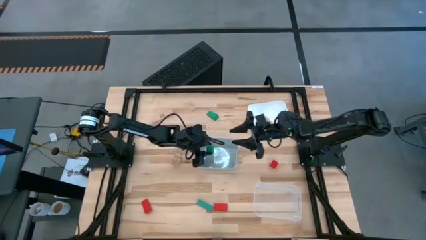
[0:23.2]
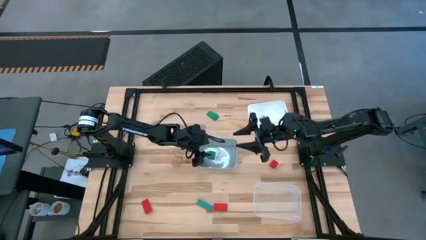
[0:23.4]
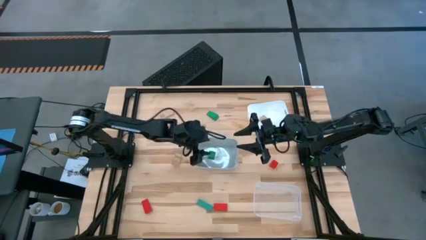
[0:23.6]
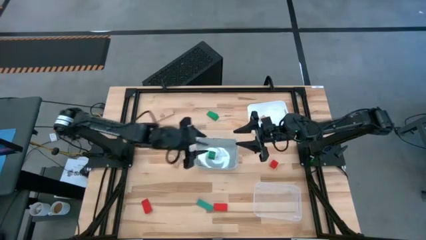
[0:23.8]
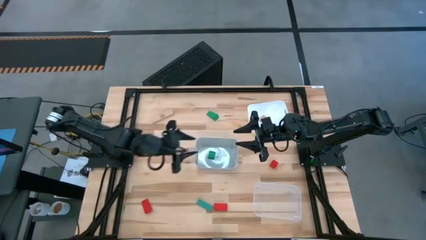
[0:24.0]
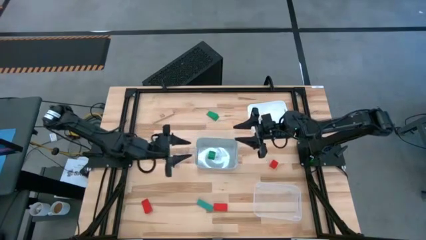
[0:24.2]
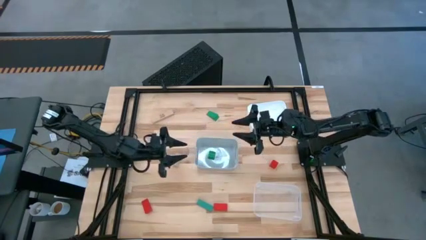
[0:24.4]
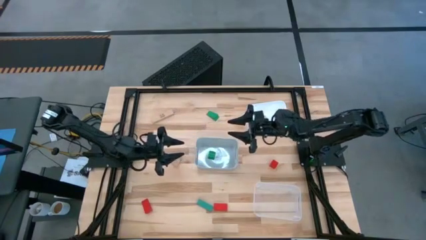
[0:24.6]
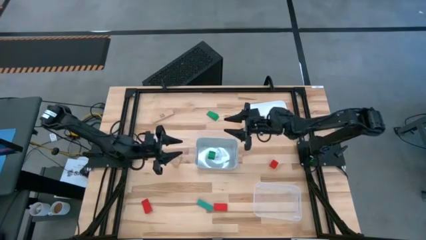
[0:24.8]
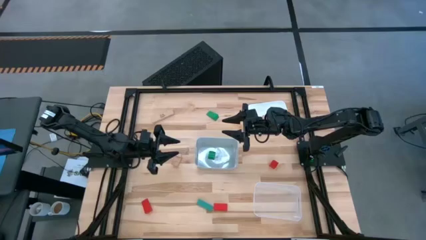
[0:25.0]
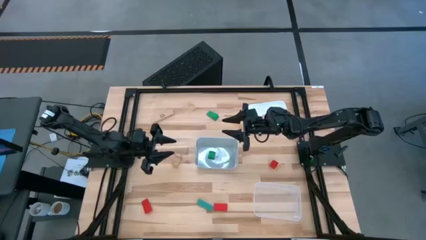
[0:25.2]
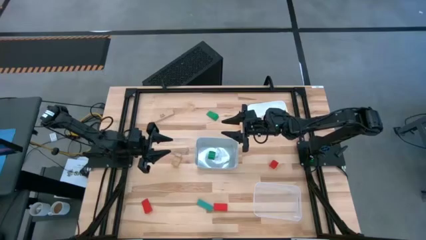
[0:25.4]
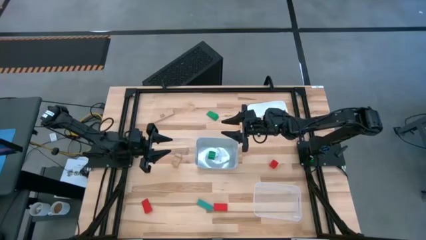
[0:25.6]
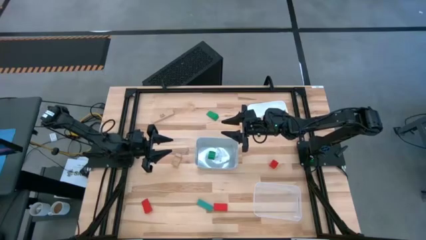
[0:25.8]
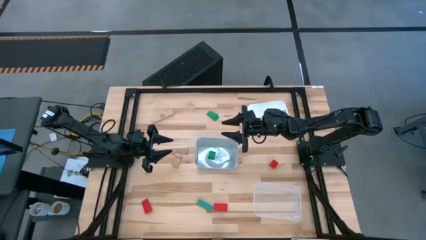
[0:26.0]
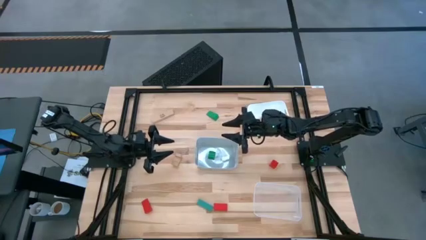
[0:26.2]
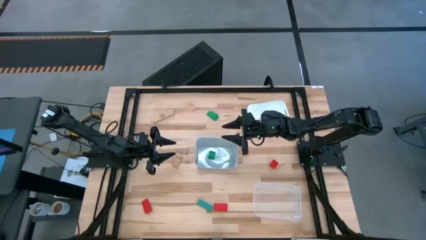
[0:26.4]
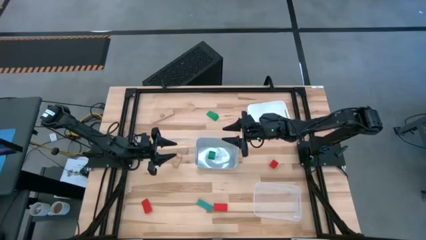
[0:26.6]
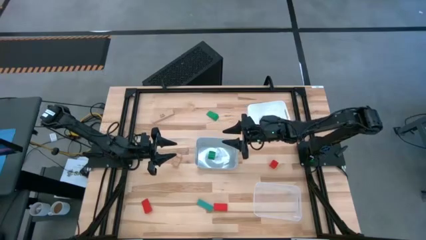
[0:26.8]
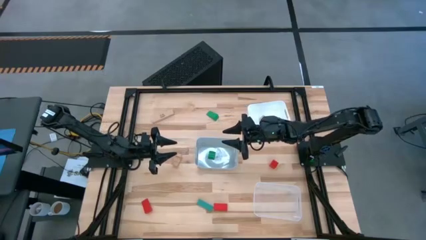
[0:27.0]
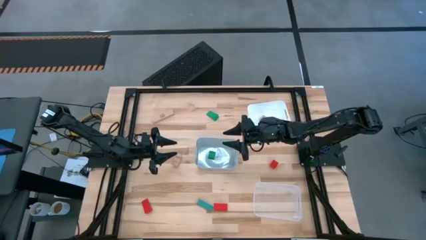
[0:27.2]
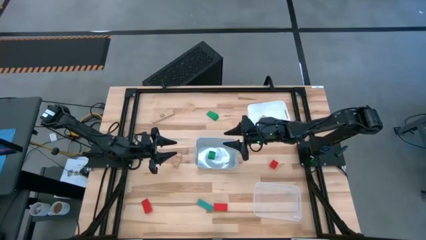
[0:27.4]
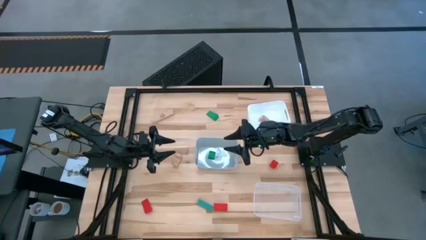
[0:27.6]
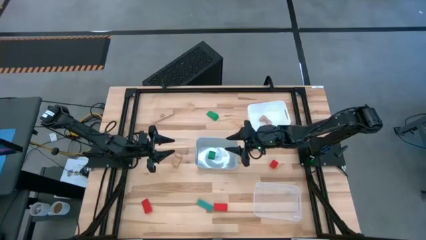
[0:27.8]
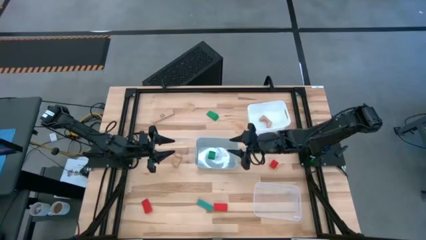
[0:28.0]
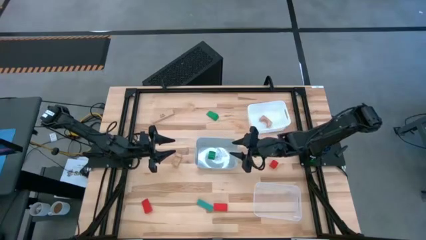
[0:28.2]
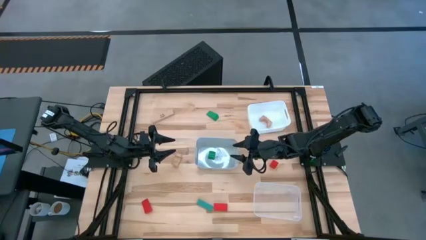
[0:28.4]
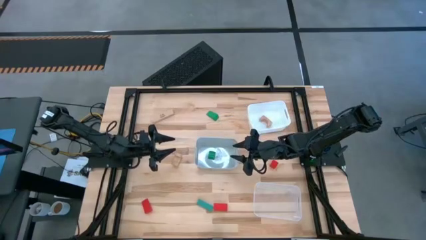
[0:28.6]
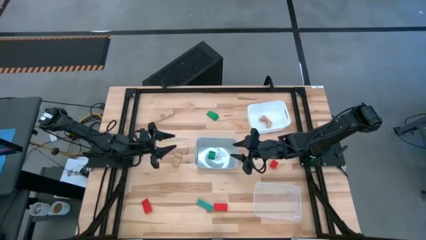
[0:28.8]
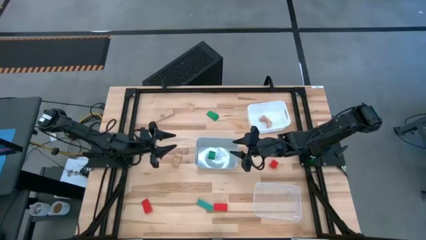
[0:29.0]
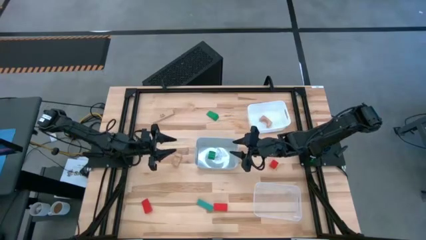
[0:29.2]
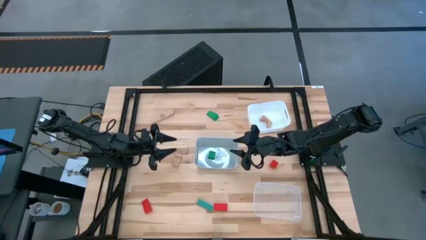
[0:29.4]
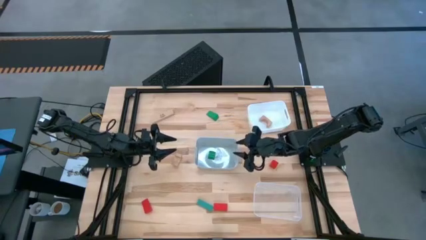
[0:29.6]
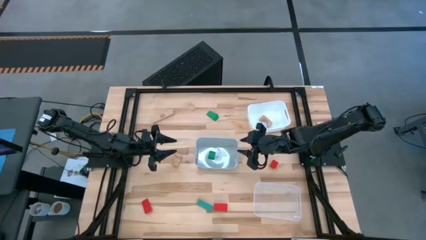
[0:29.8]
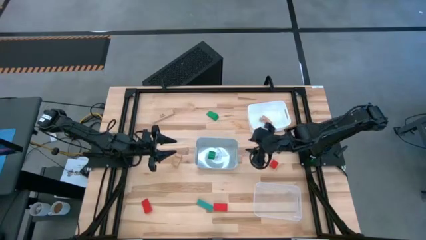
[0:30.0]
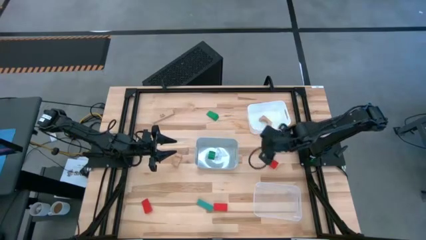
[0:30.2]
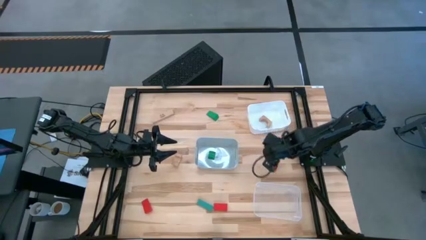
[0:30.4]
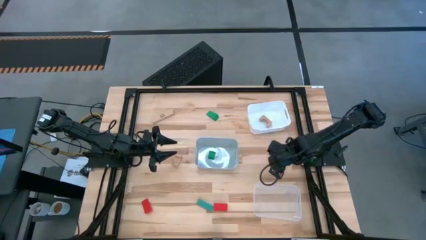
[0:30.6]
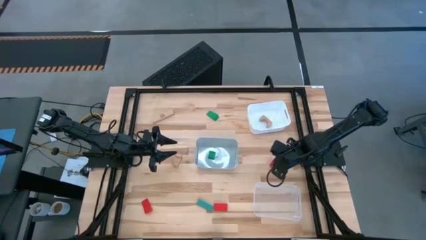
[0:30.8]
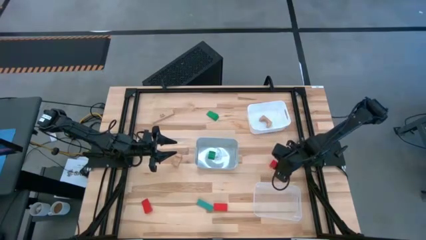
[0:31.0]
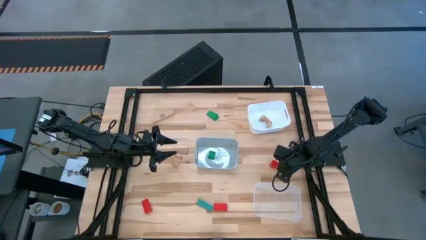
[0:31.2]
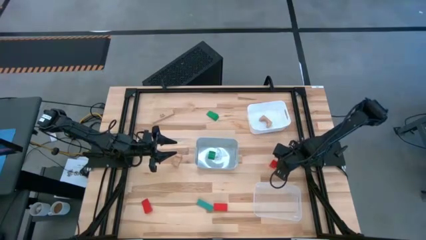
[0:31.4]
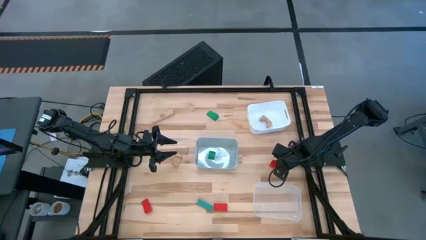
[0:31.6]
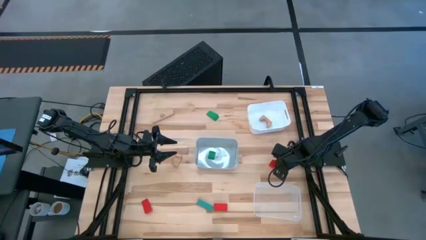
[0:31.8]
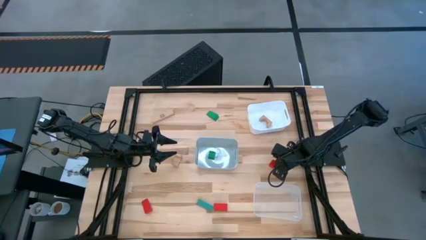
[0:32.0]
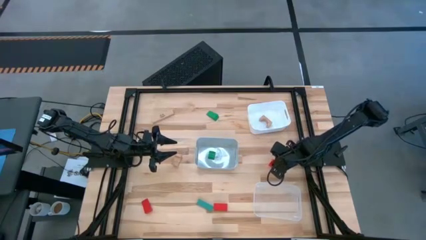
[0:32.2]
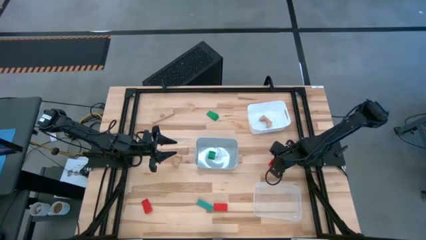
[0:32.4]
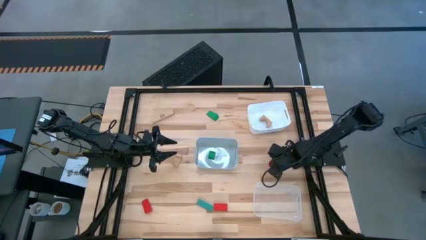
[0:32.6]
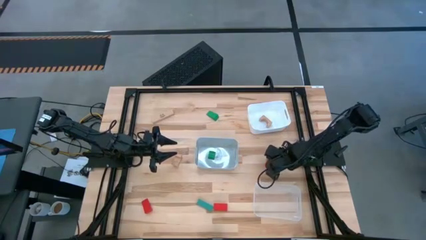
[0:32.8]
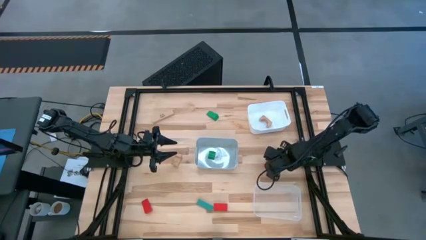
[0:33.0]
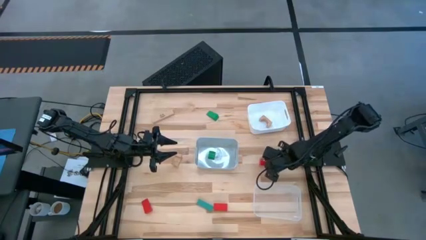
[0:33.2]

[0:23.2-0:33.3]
Task: Sort & place blocks by color
Put the top red block into the transparent bin

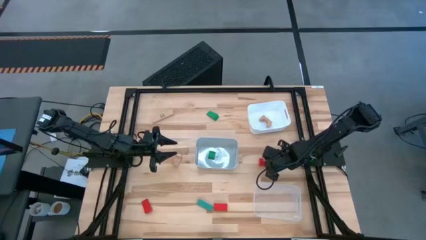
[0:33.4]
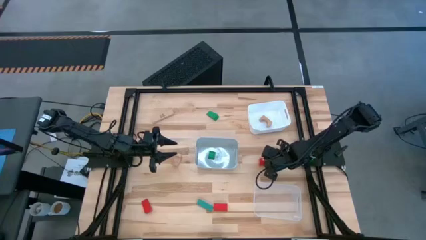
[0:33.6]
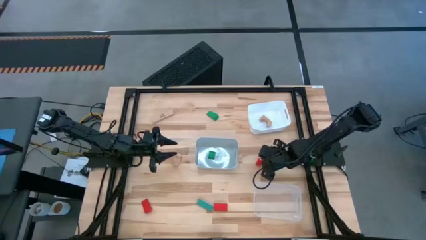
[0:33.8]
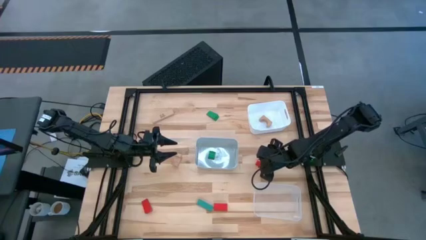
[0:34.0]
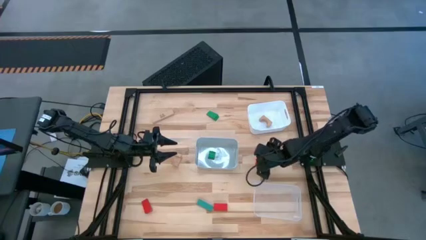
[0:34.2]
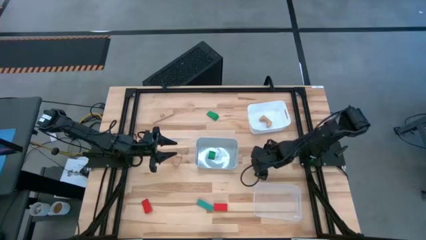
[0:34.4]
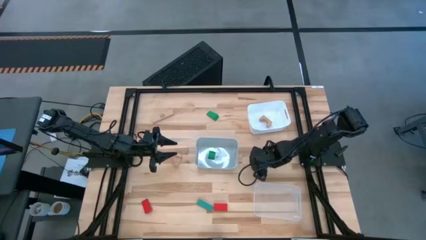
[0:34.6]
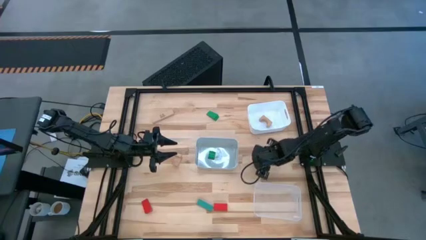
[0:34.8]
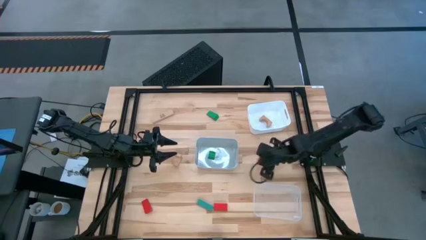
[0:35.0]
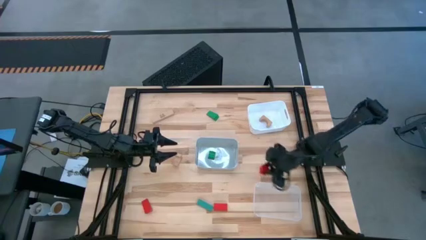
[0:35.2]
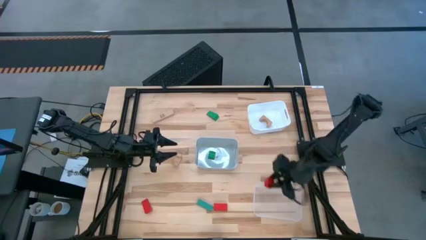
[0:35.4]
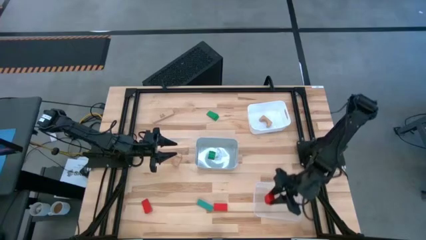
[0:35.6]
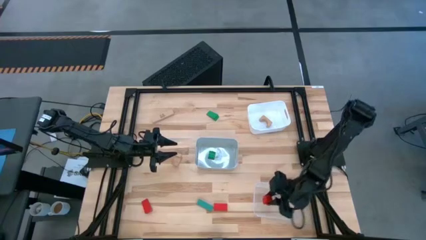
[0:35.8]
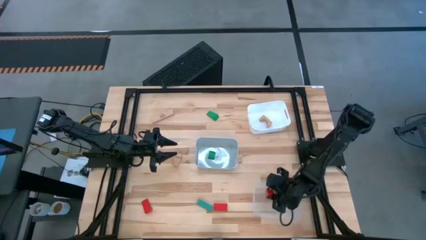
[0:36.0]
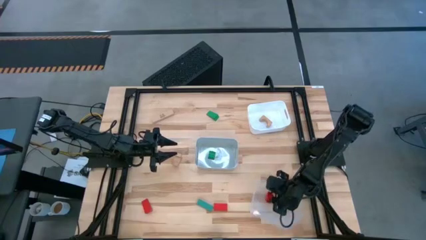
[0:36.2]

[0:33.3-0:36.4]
Put the top red block into the transparent bin
